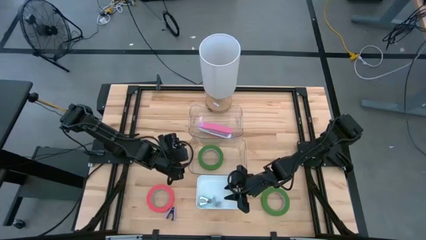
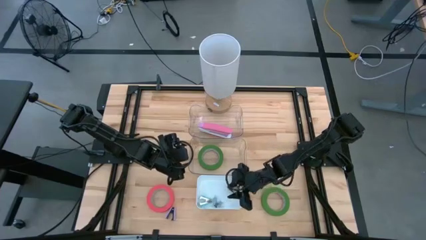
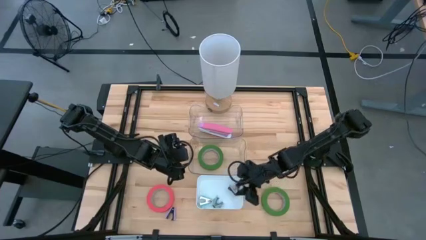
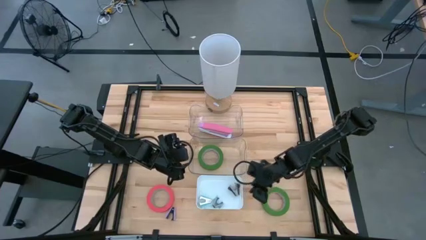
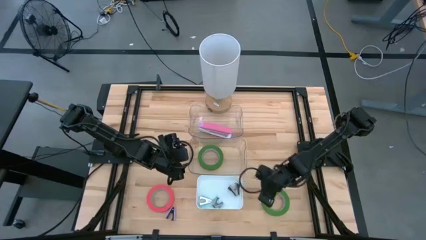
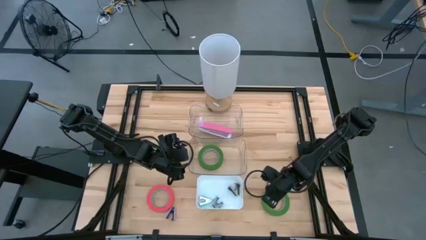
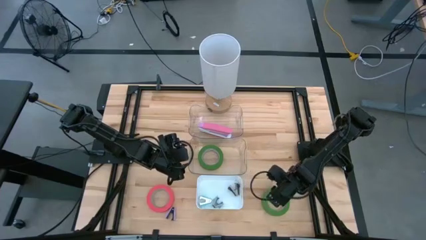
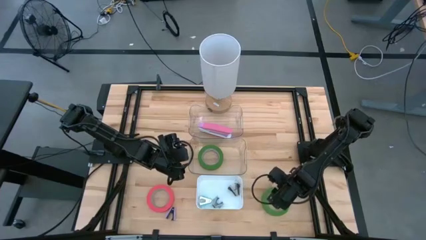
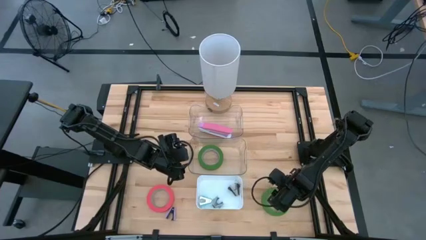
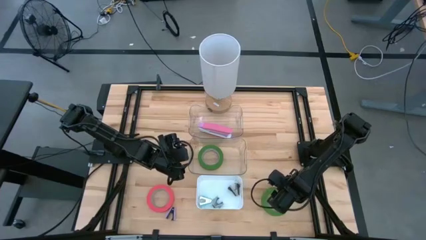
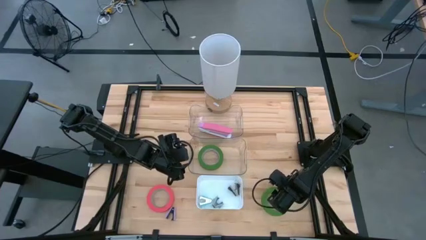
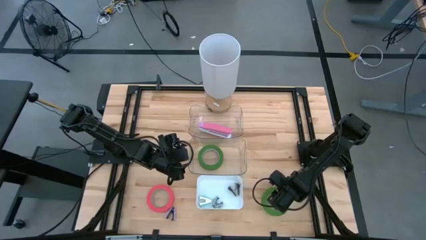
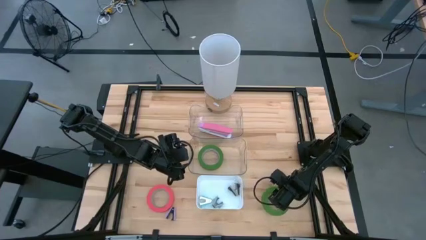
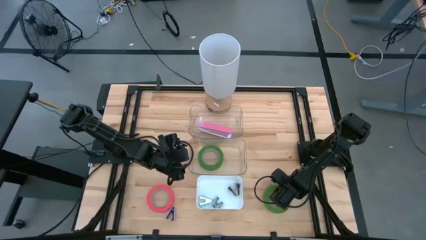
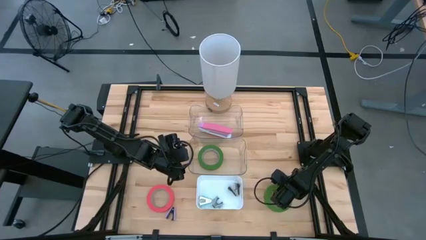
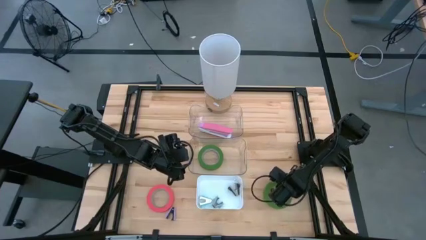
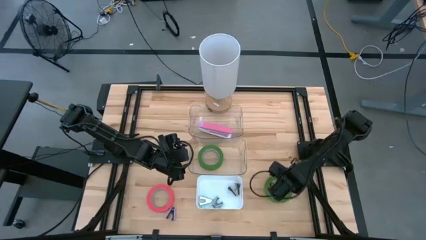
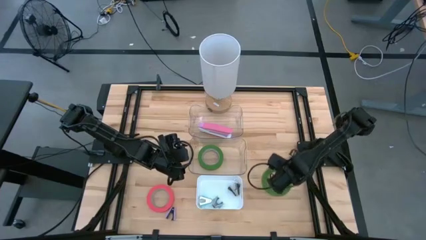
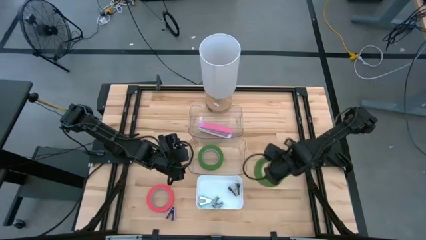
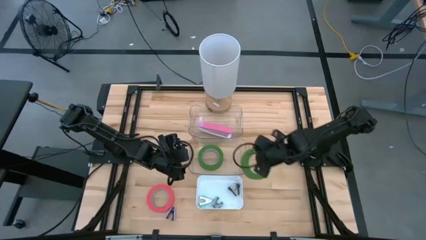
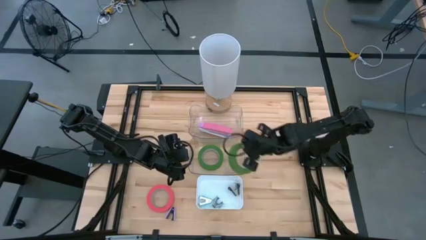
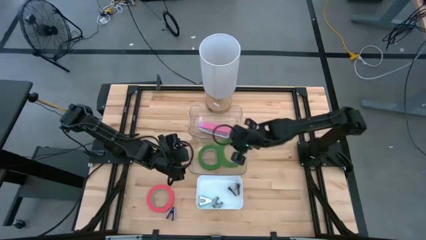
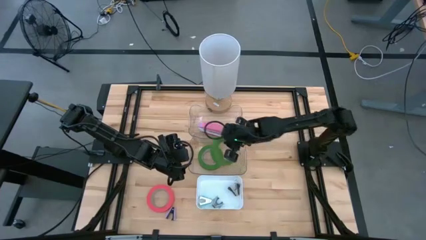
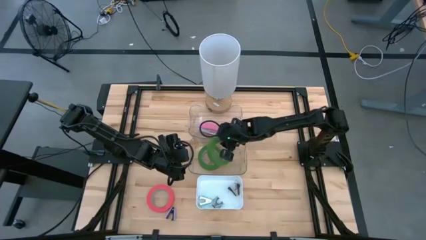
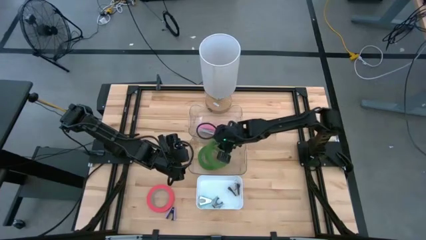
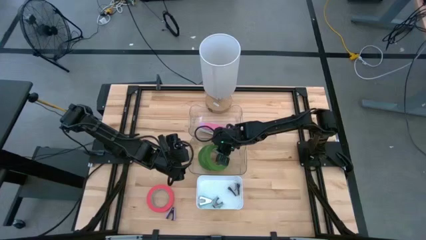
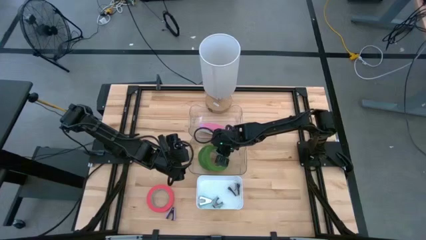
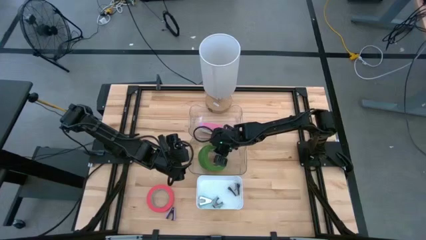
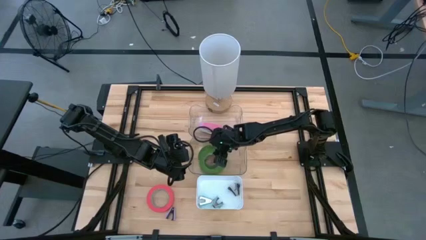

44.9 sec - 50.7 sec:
Task: Pick and place Stapler, Stapler remover, tape
Put the green tape into the bottom transparent bin

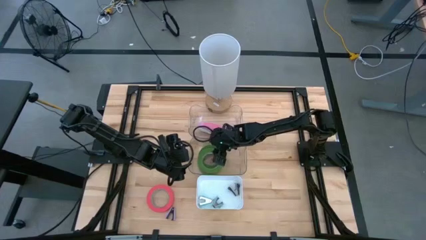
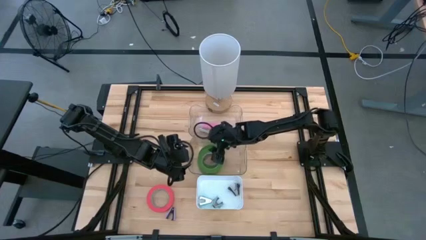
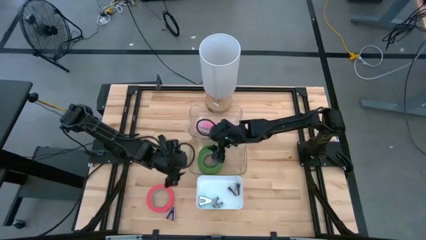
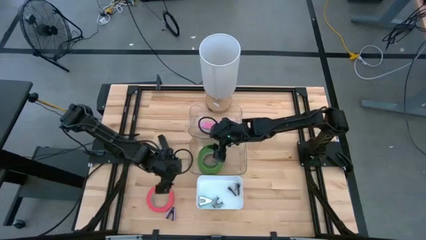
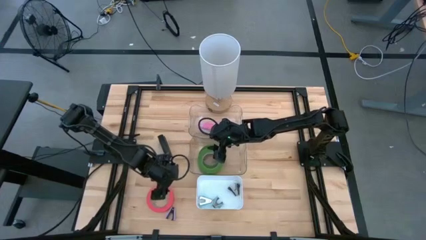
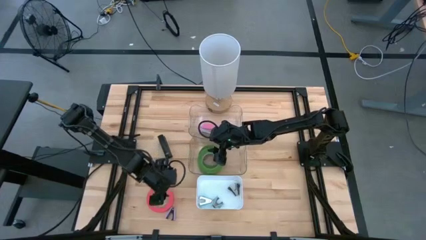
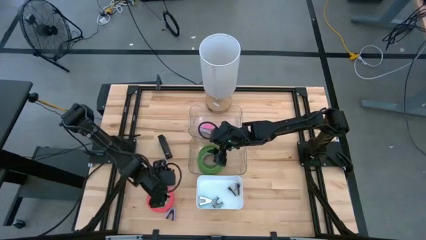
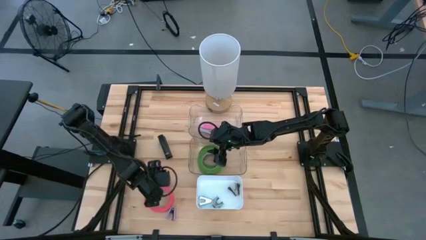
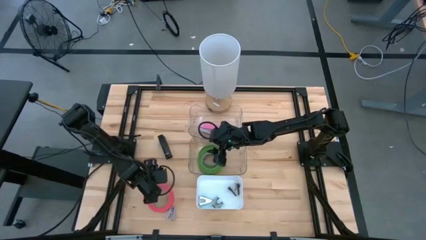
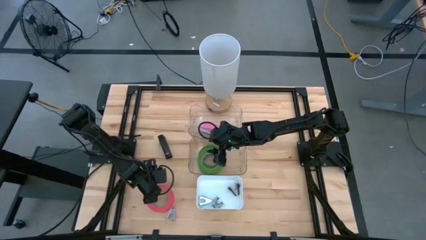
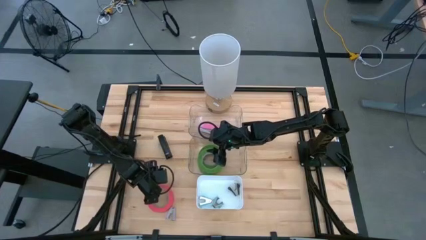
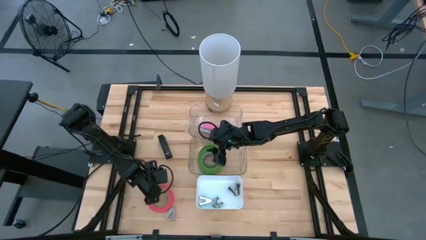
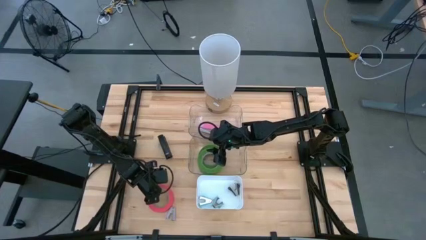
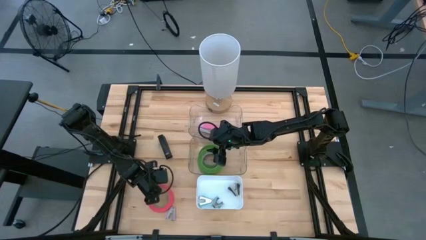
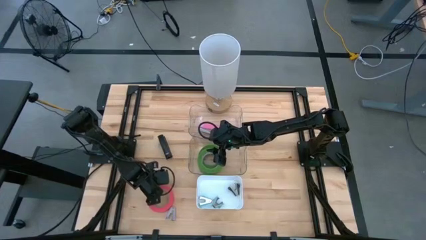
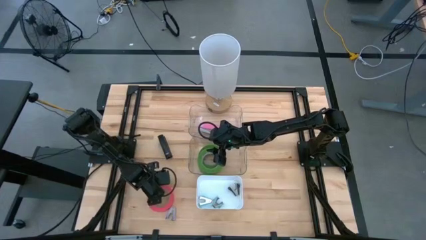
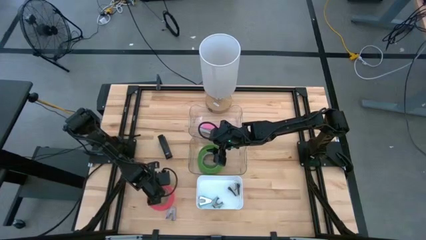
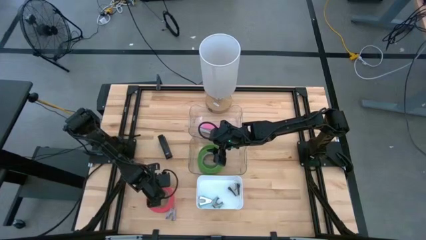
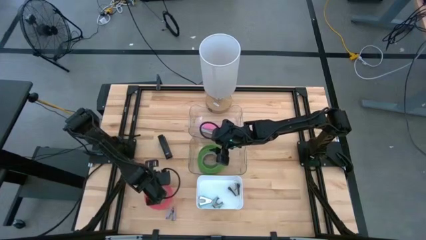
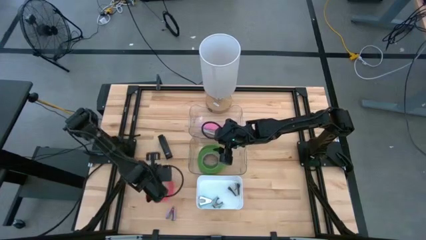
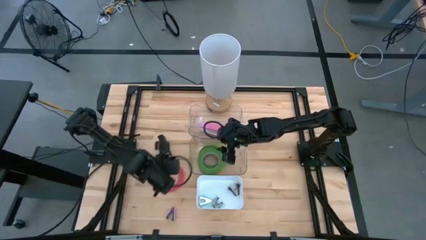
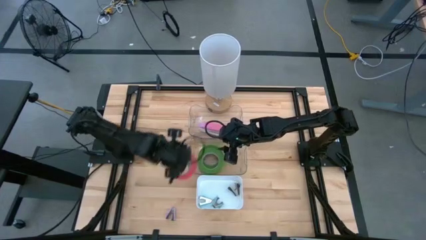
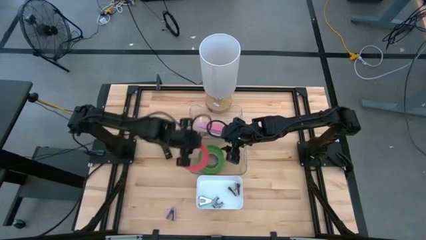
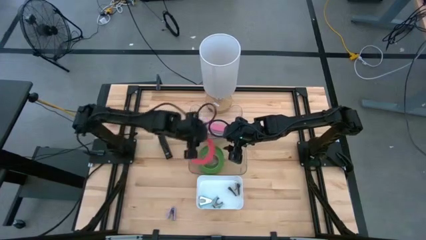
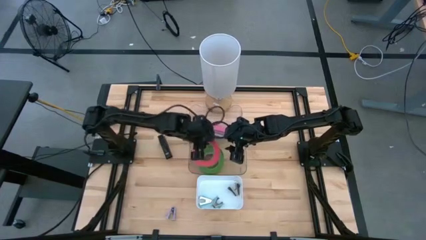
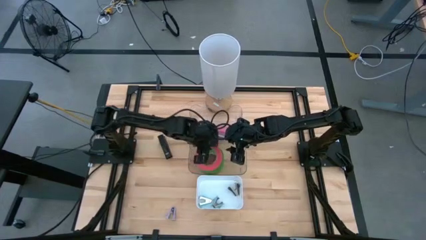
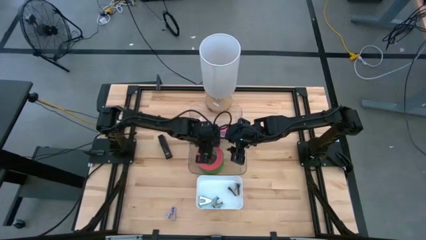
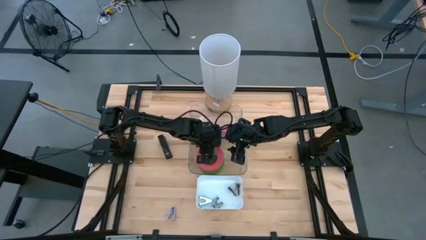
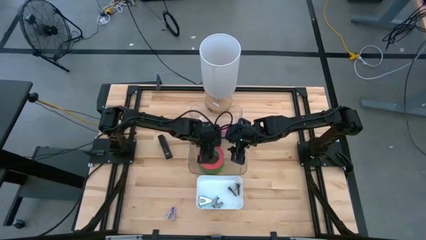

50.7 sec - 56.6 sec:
Put the pink tape into the bottom transparent bin

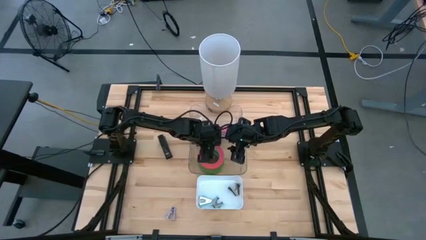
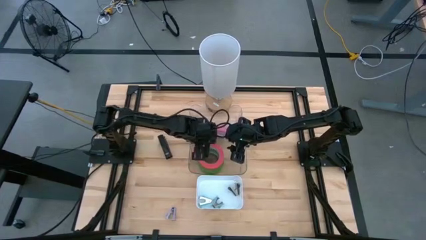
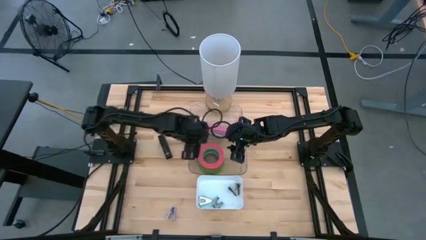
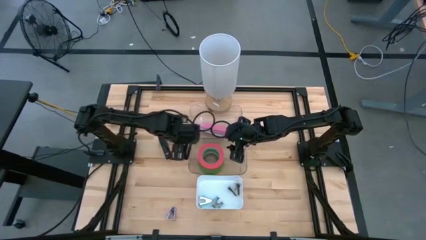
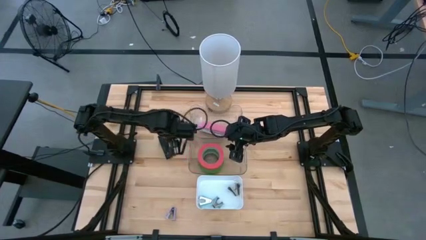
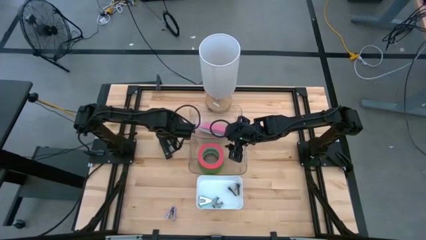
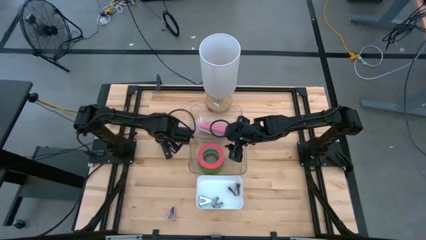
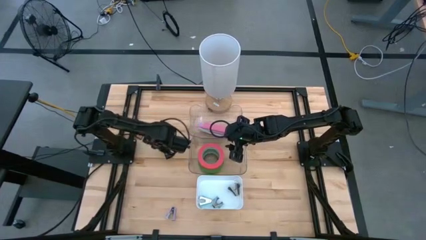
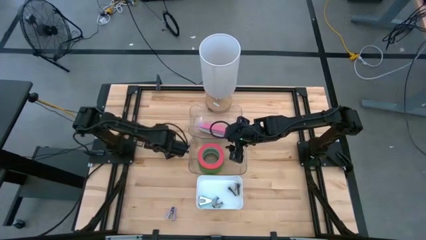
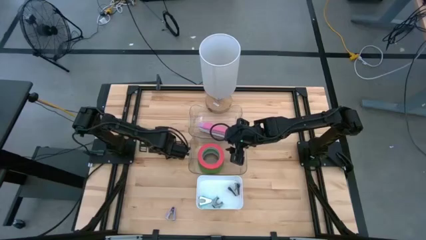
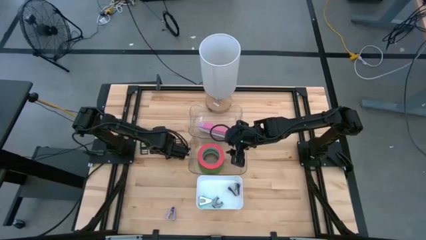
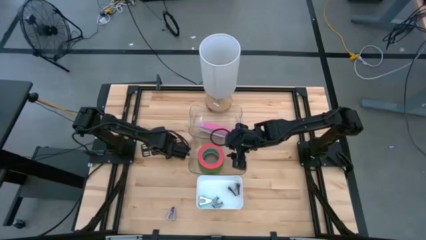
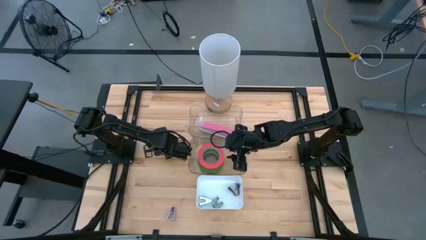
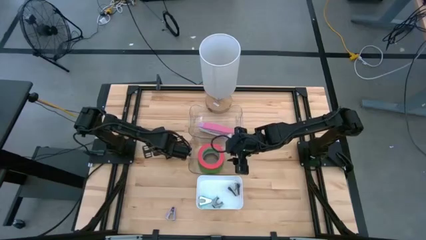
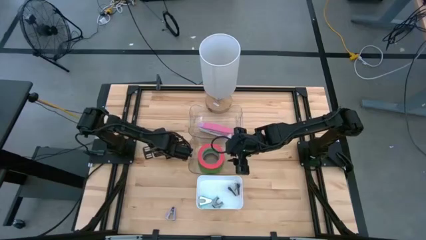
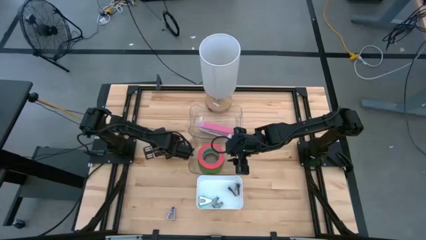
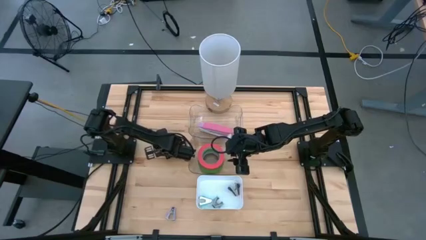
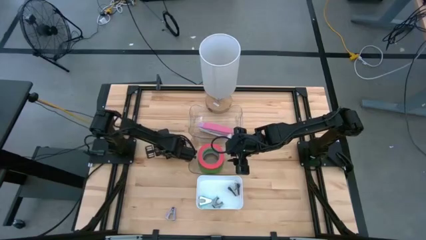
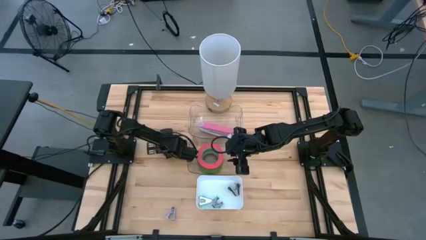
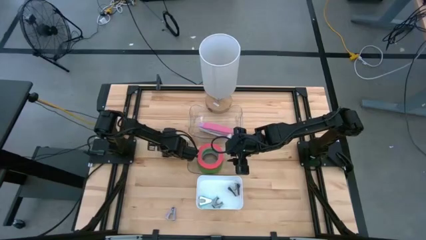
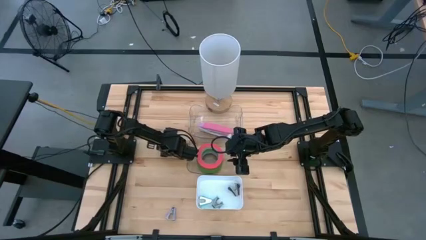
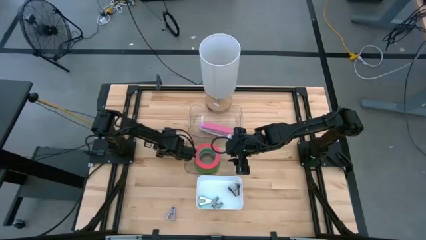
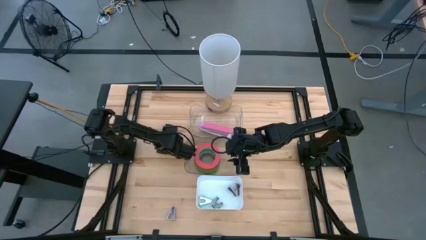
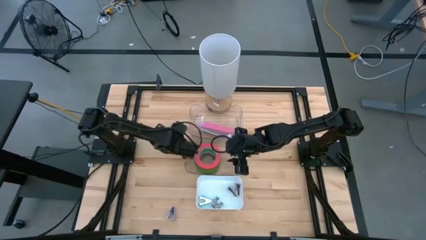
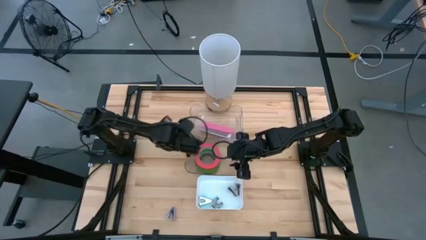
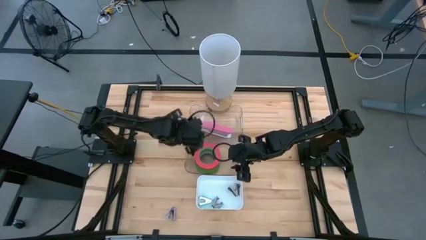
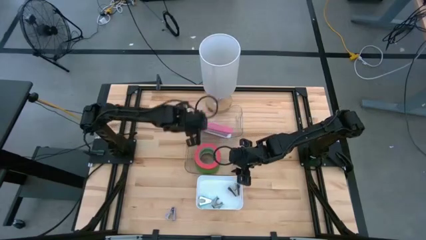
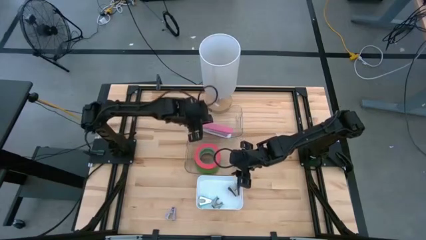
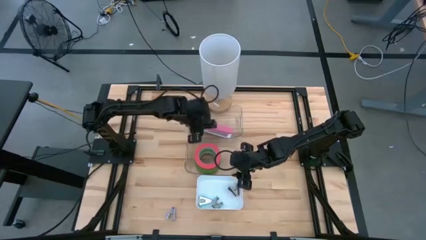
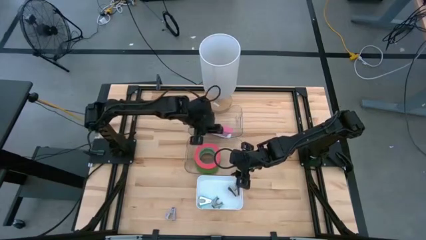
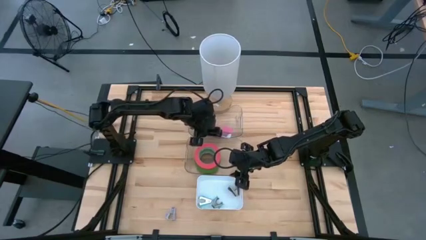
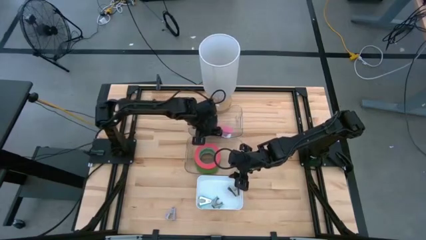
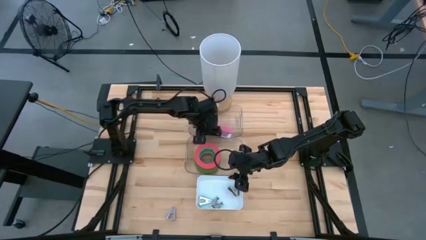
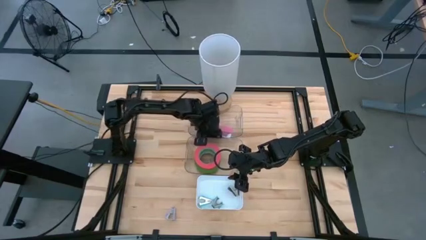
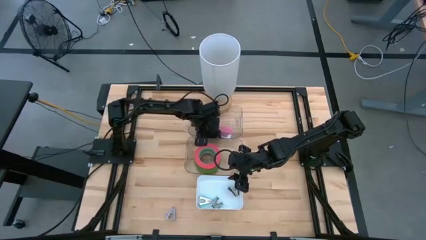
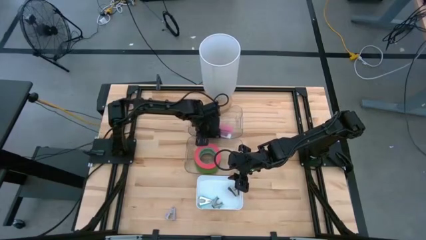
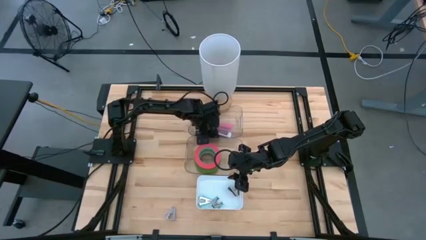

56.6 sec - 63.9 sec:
Put the black stapler into the top transparent bin
